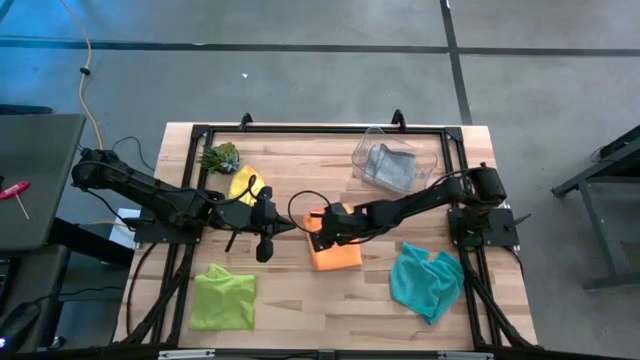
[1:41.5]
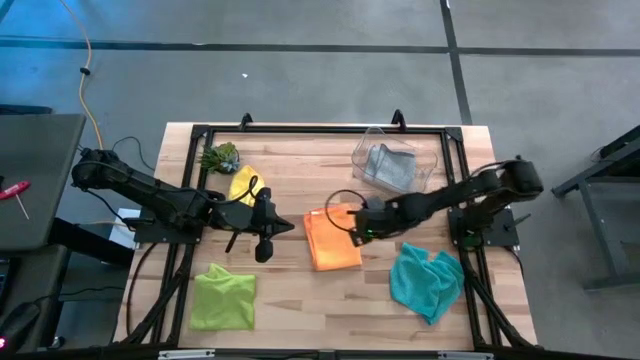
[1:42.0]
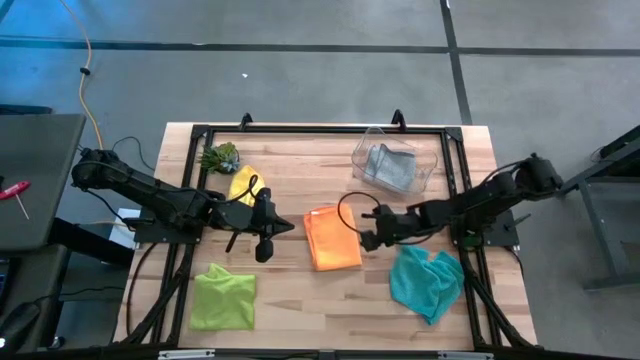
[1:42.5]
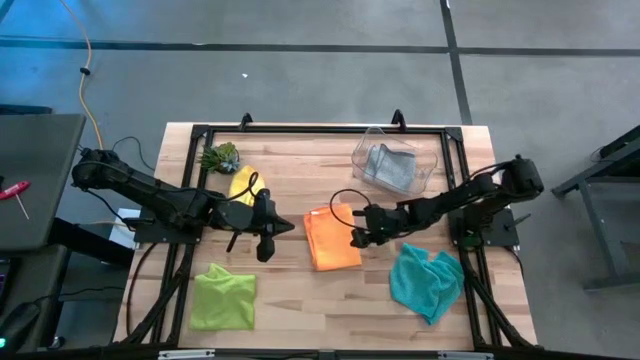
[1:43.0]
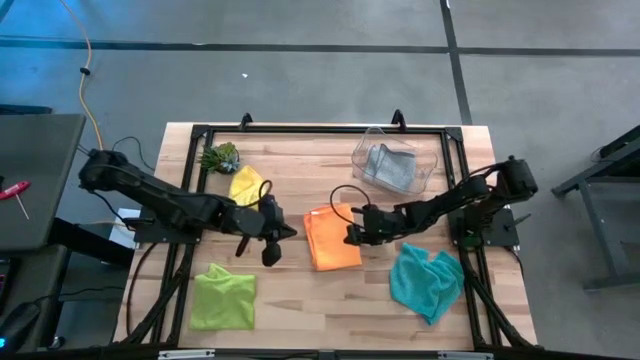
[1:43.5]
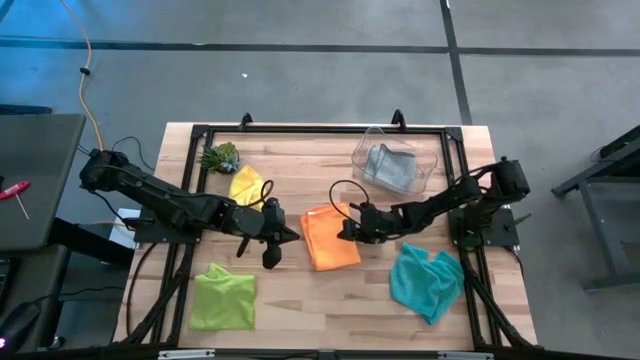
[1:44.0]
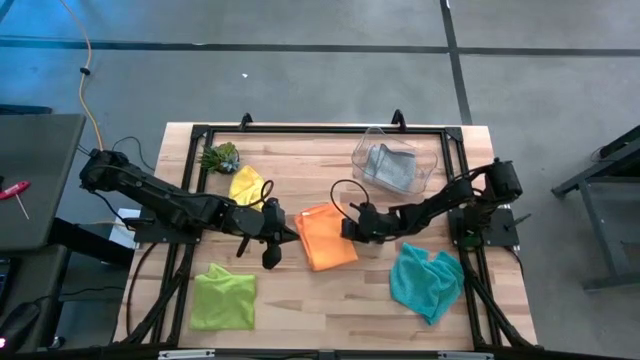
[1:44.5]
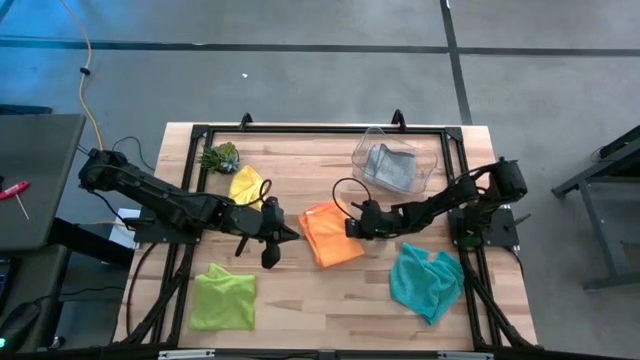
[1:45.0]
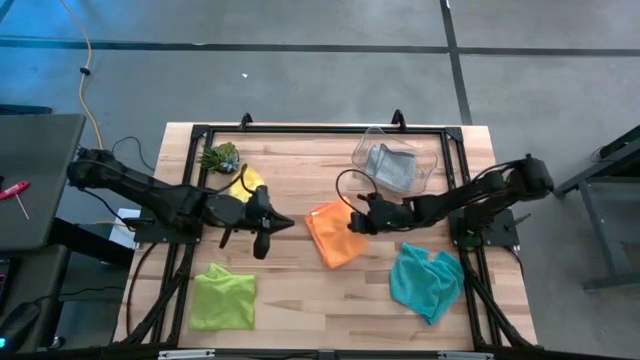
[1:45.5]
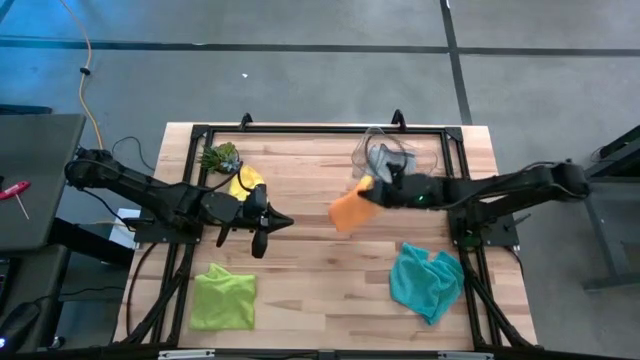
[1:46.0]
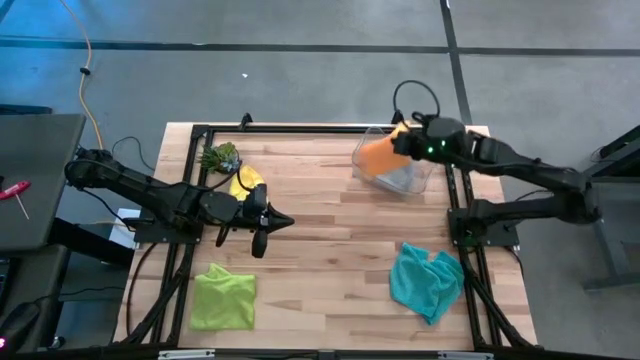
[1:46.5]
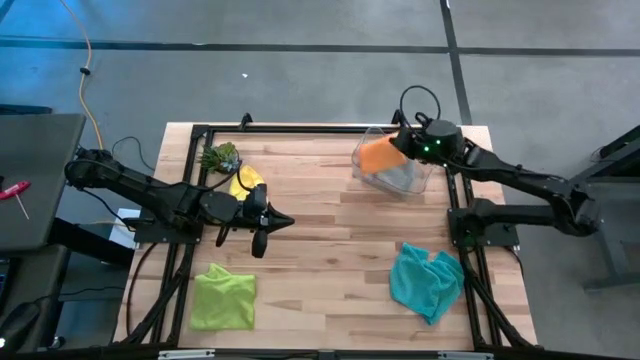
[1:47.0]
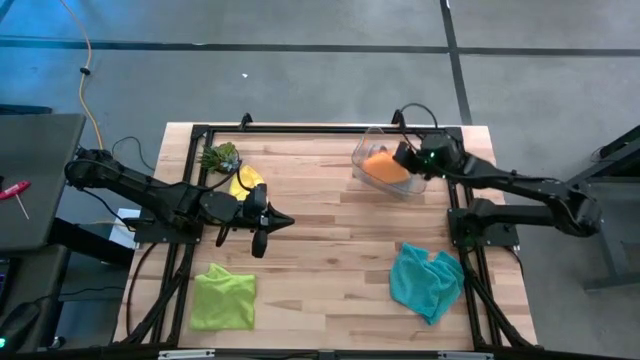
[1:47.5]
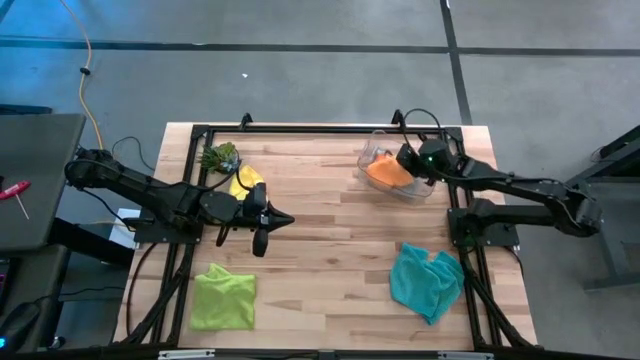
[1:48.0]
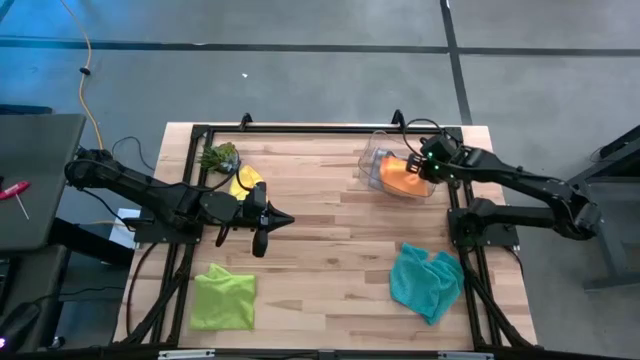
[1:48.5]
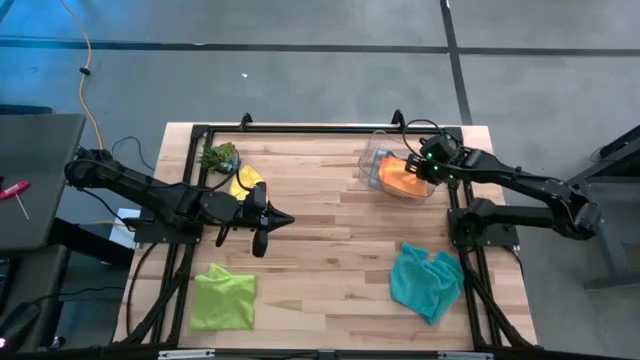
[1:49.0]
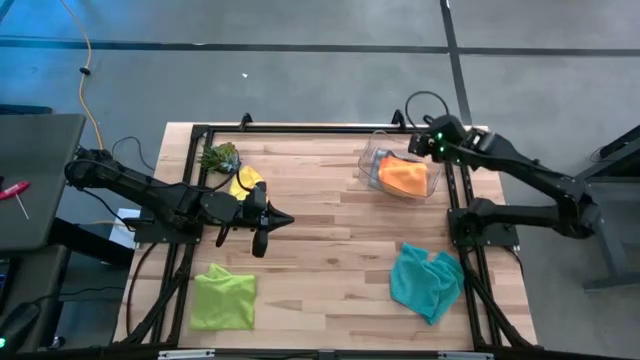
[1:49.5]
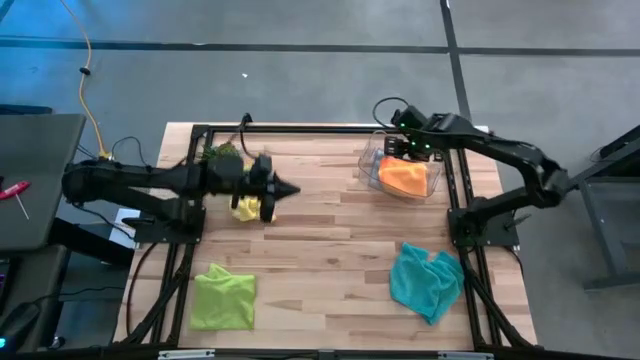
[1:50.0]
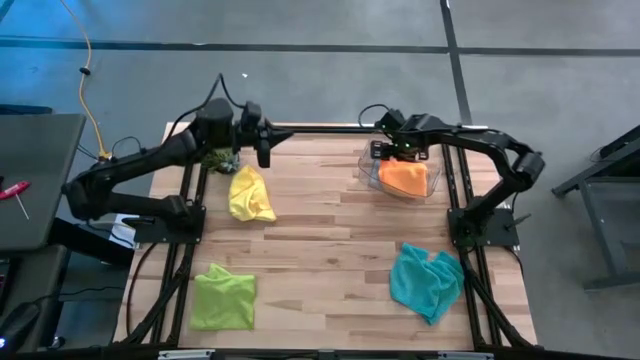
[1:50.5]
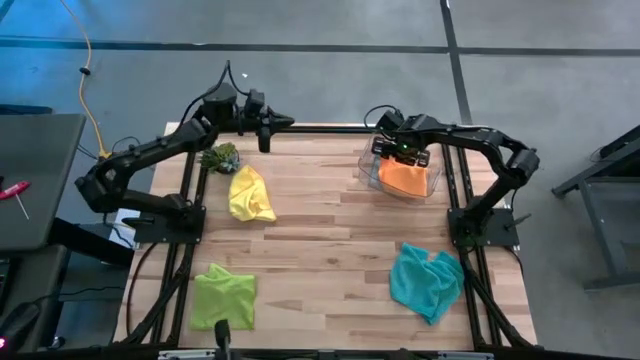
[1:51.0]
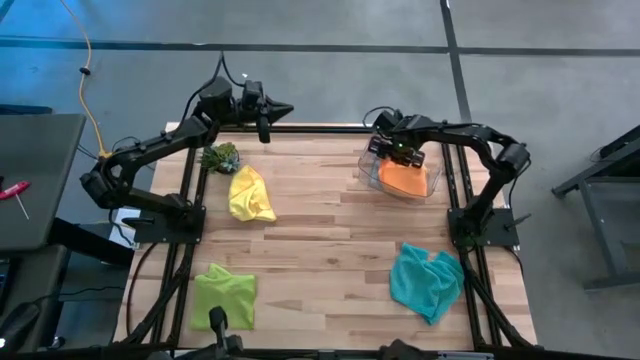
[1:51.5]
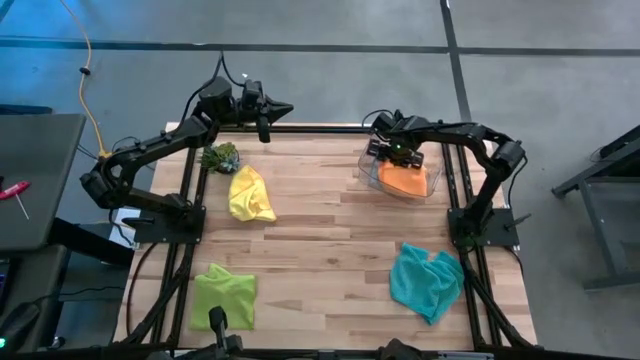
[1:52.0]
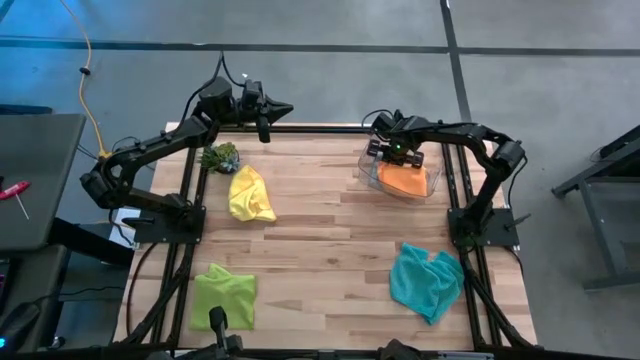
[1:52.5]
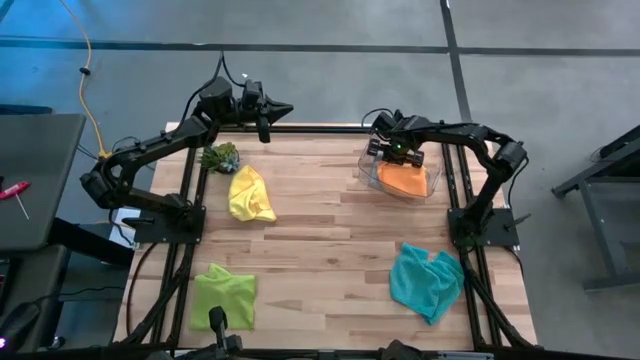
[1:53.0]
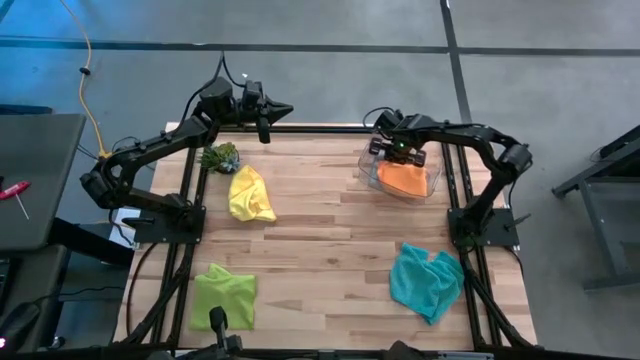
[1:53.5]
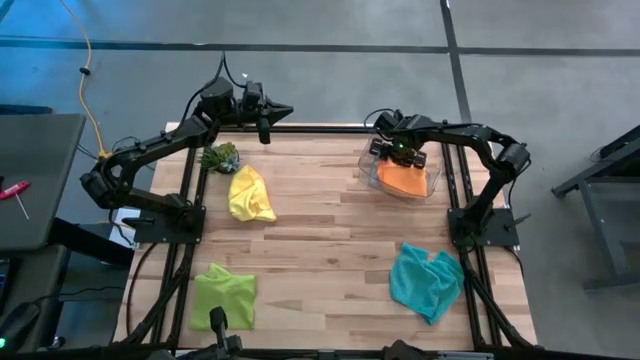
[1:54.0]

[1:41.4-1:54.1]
Task: Fold microfiber towels
Put the orange microfiber towel into the transparent bin

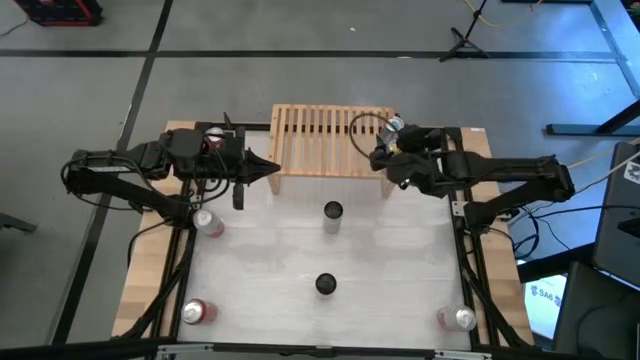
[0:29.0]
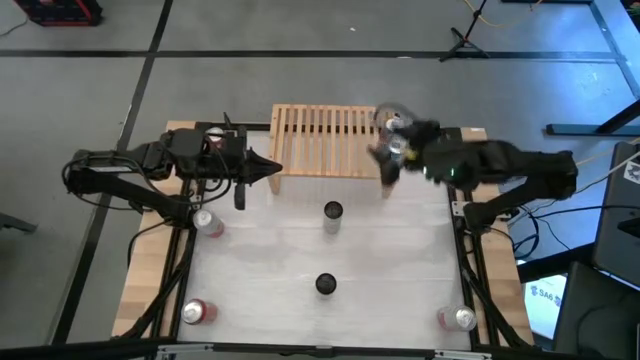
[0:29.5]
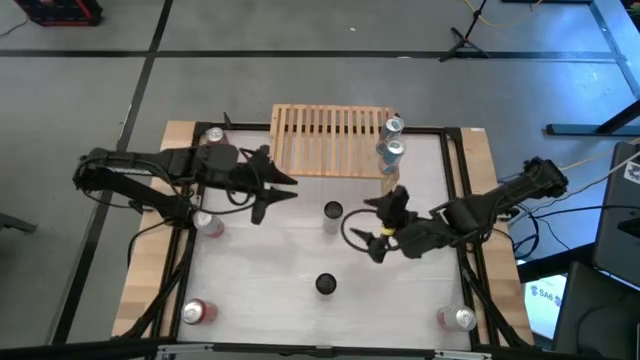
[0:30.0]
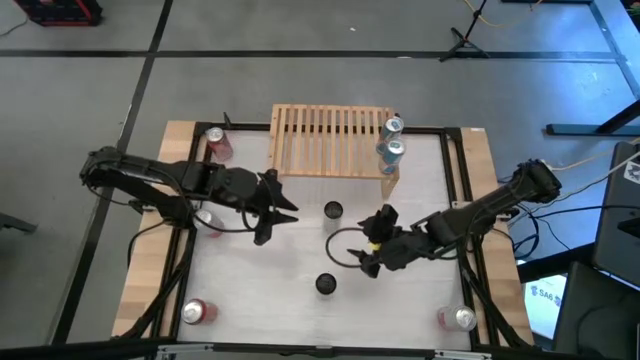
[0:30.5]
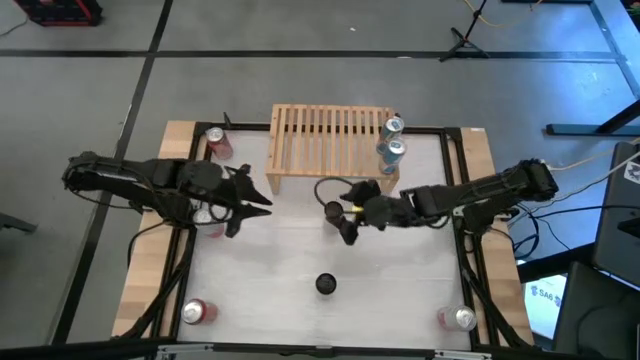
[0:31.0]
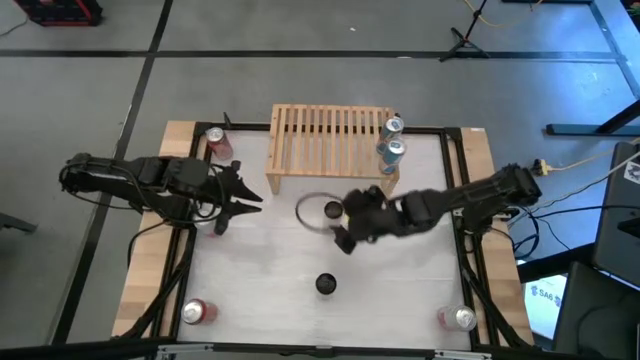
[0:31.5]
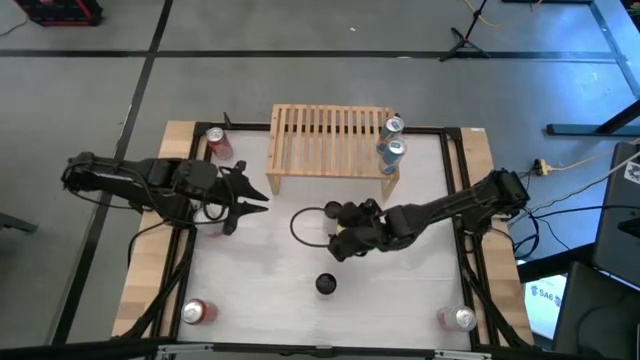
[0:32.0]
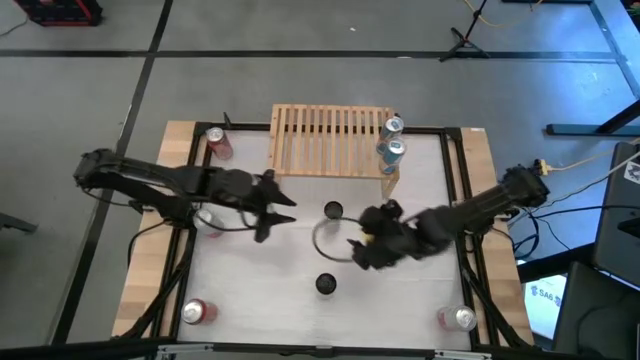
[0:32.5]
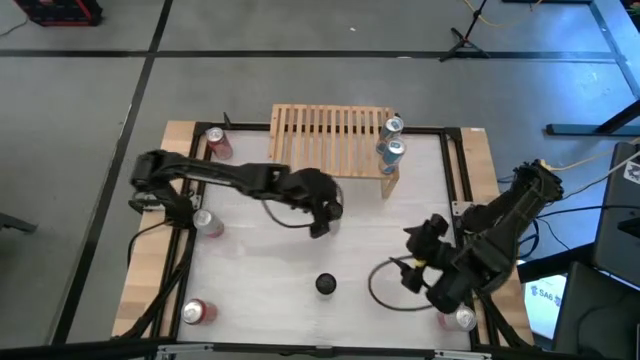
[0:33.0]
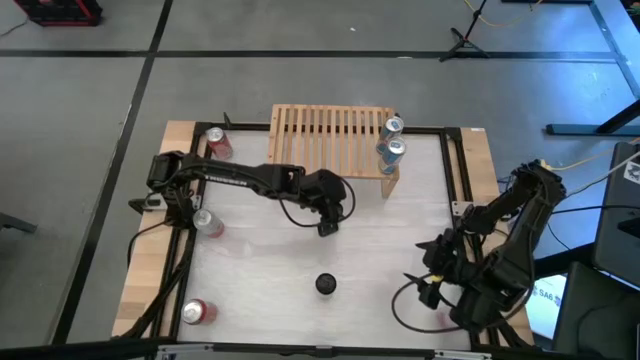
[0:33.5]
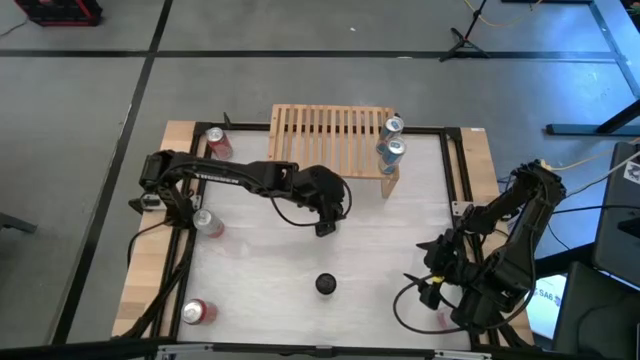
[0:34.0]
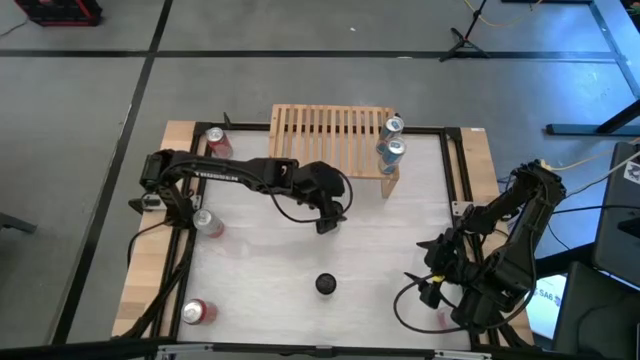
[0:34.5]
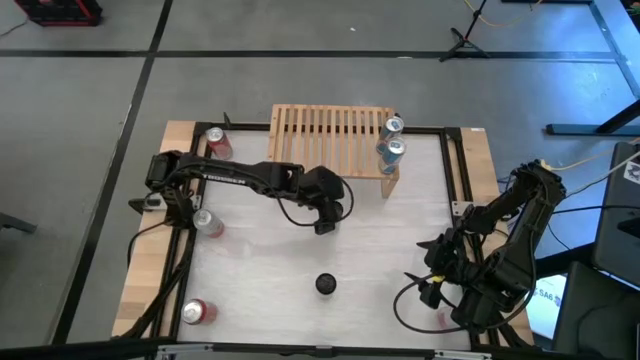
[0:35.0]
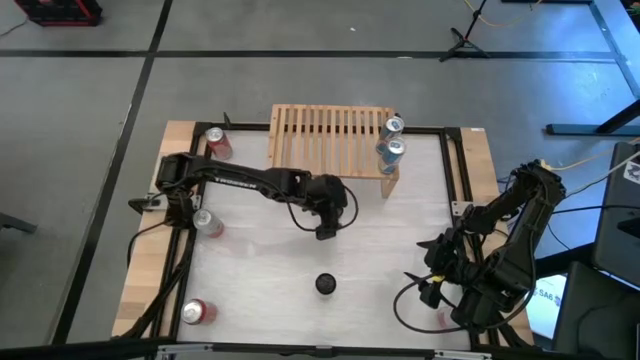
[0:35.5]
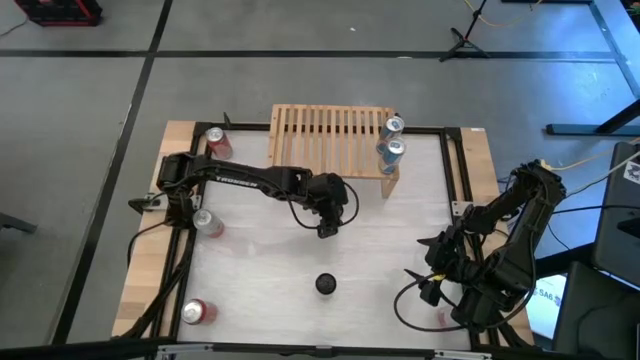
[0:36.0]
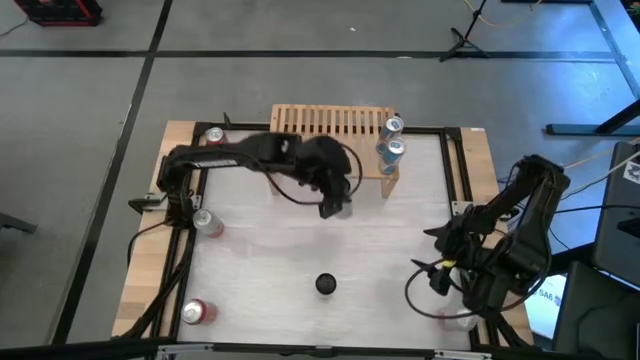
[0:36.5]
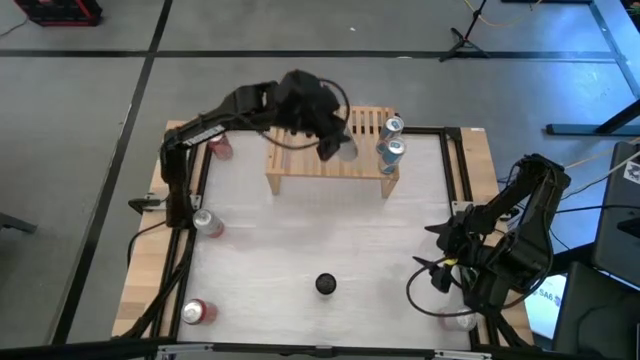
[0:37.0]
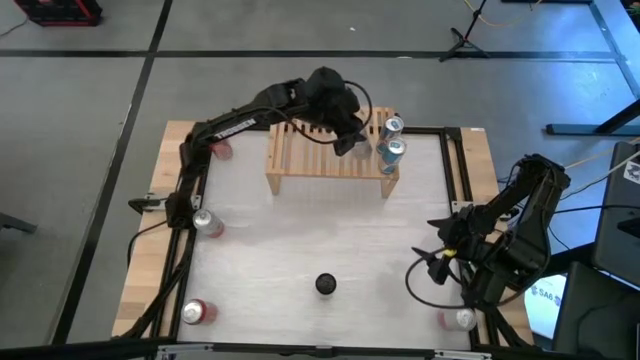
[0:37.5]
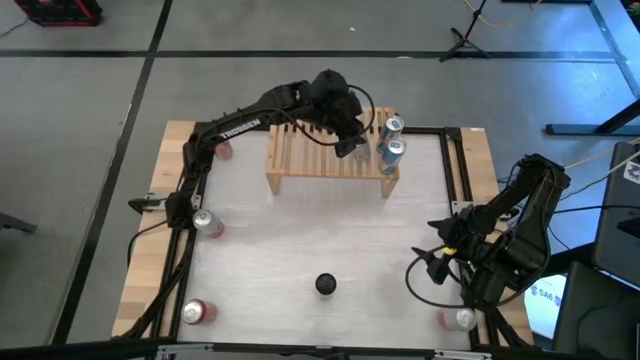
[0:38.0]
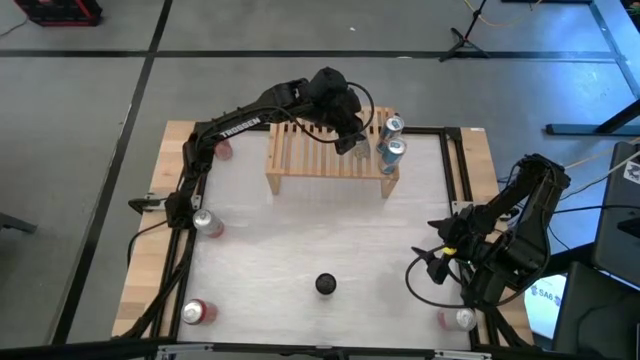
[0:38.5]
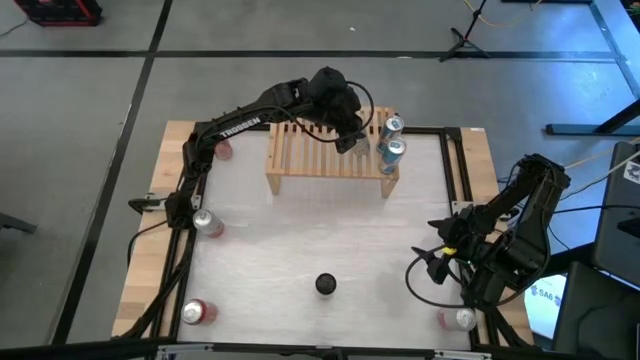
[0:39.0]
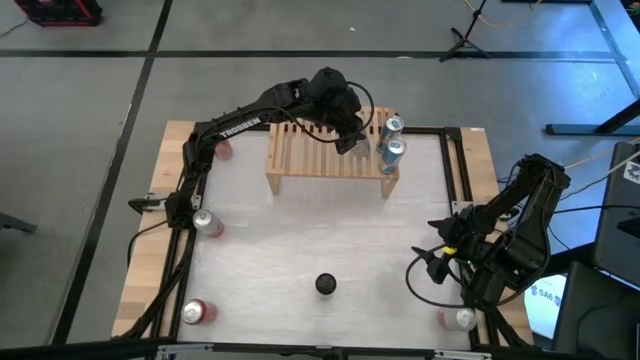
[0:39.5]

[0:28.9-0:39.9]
Task: Place canned beverage on shelf
Put the top white and yellow soda can on the shelf
